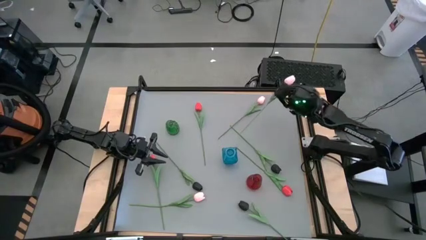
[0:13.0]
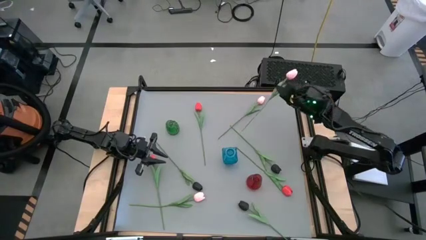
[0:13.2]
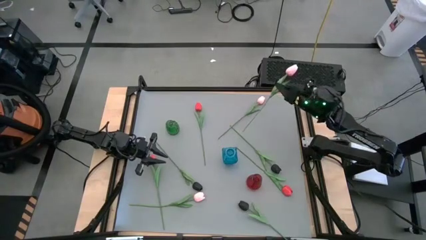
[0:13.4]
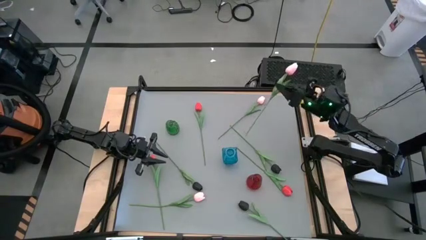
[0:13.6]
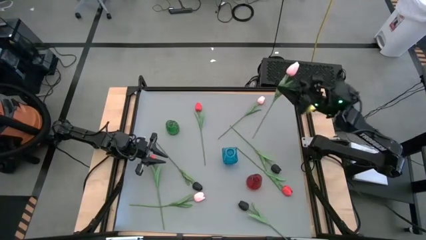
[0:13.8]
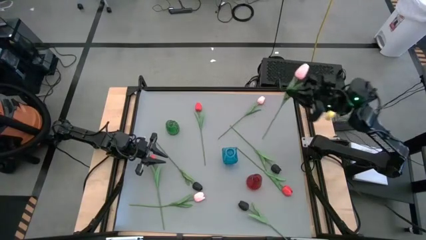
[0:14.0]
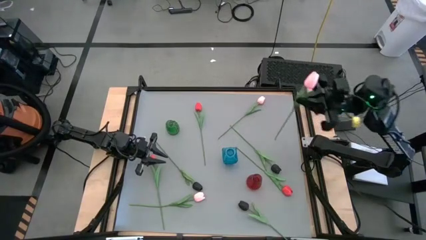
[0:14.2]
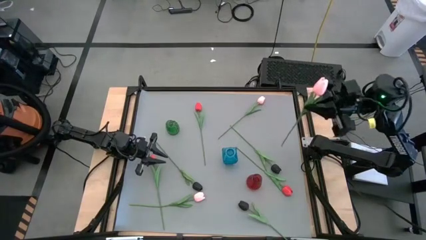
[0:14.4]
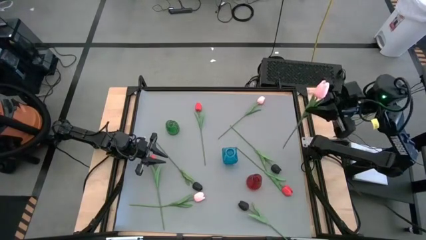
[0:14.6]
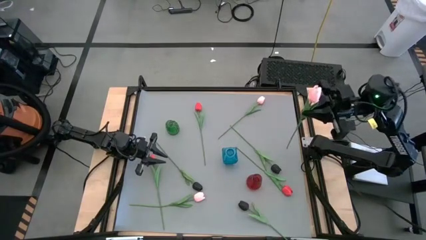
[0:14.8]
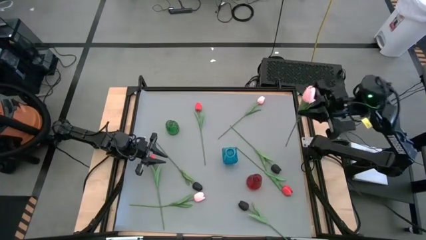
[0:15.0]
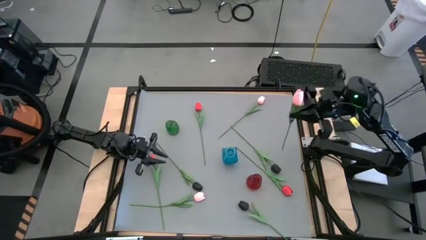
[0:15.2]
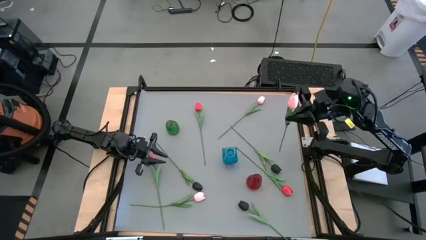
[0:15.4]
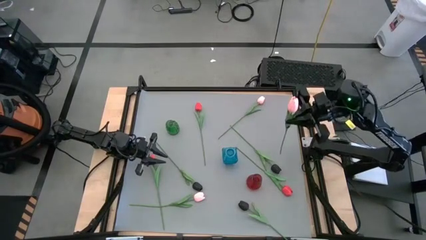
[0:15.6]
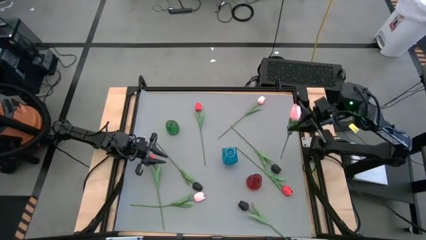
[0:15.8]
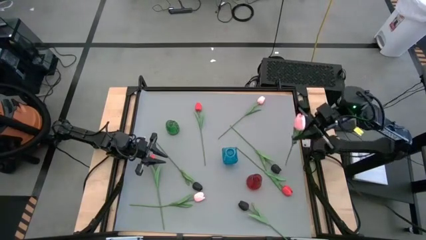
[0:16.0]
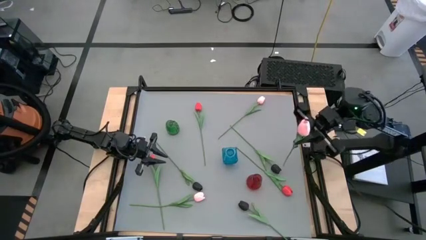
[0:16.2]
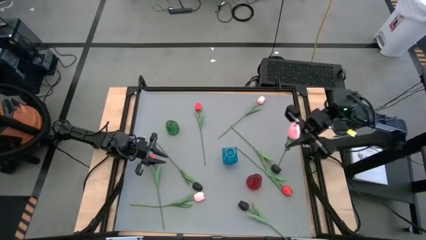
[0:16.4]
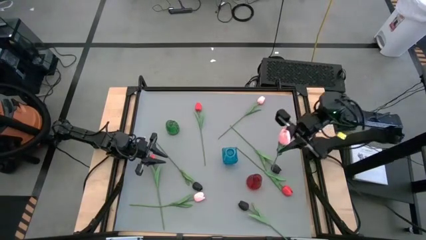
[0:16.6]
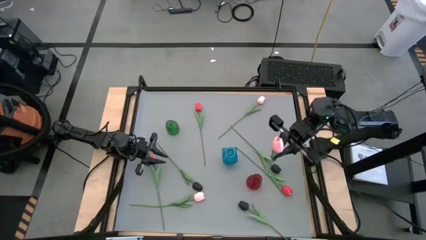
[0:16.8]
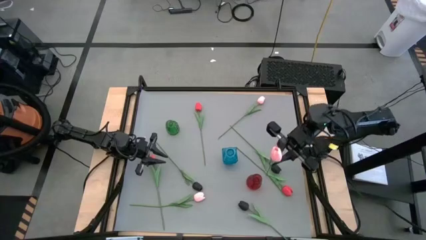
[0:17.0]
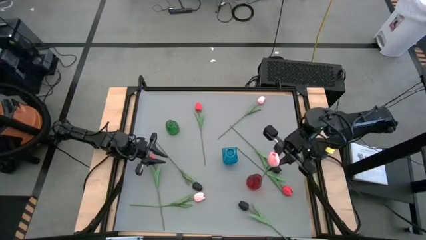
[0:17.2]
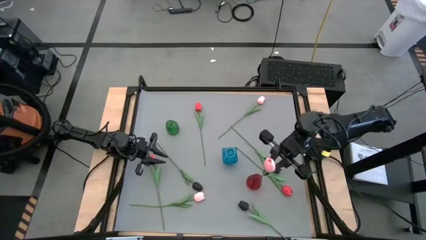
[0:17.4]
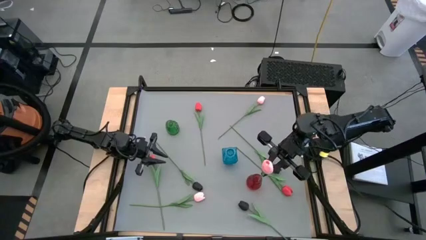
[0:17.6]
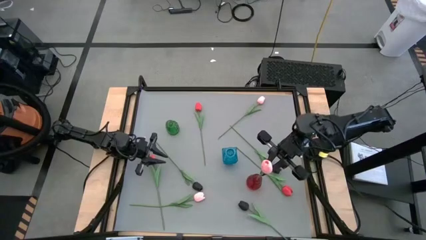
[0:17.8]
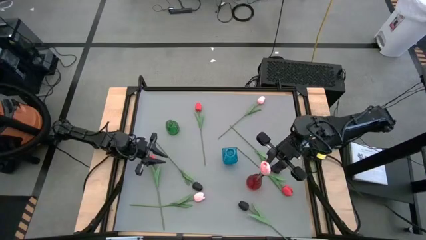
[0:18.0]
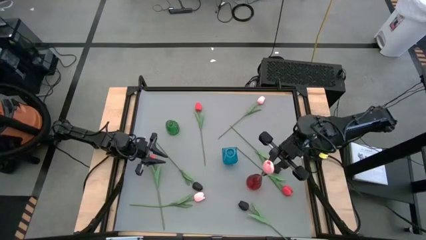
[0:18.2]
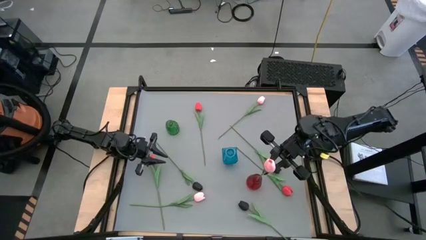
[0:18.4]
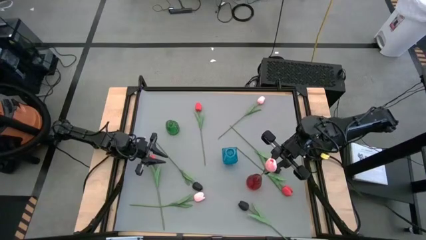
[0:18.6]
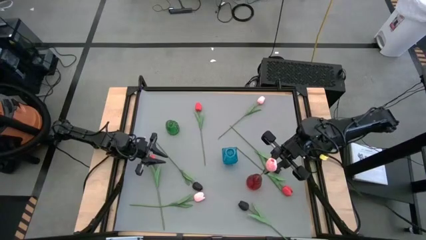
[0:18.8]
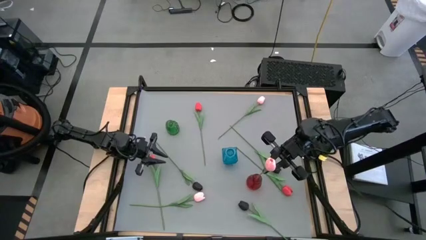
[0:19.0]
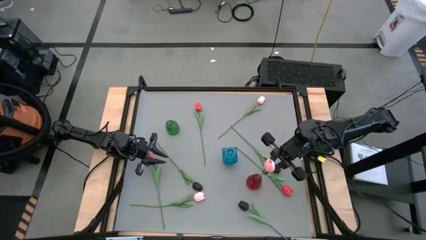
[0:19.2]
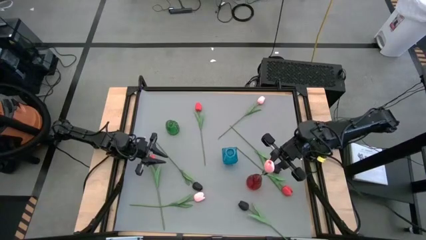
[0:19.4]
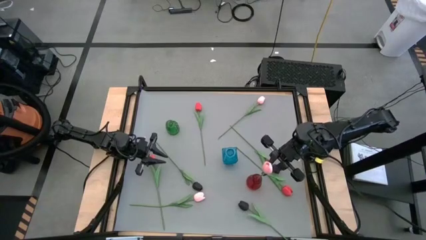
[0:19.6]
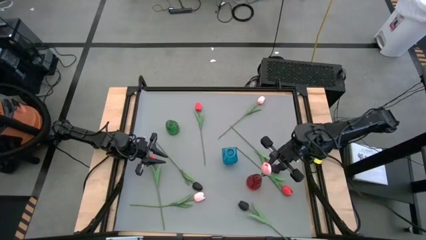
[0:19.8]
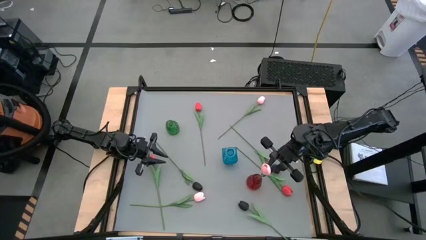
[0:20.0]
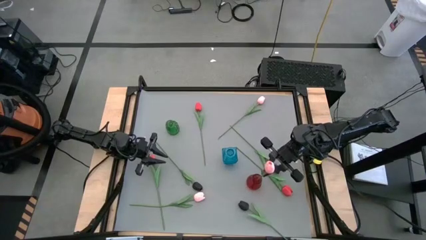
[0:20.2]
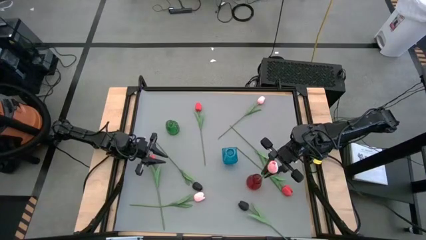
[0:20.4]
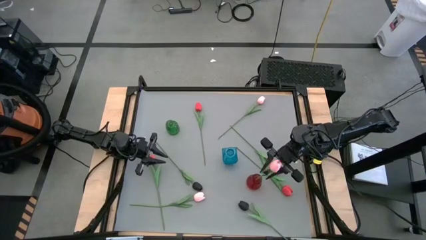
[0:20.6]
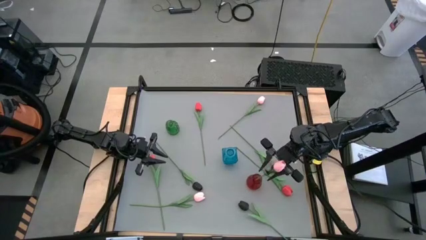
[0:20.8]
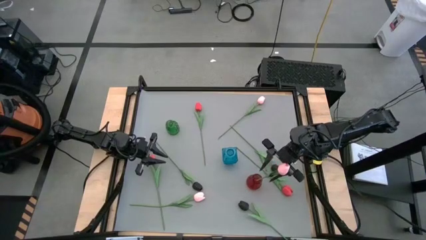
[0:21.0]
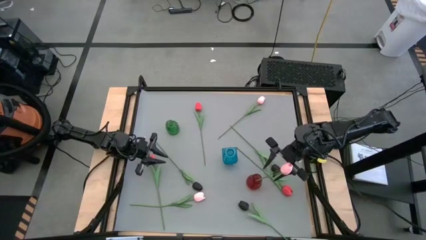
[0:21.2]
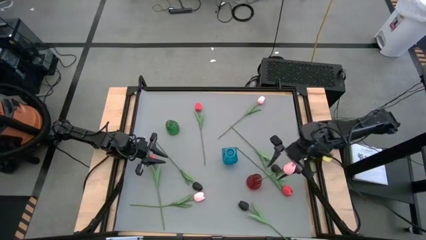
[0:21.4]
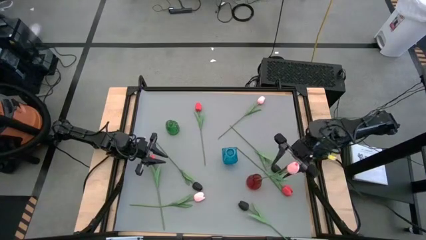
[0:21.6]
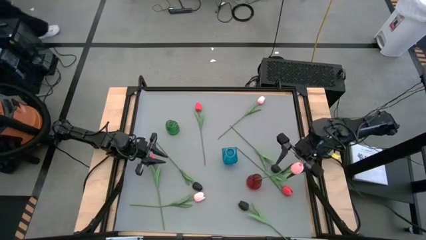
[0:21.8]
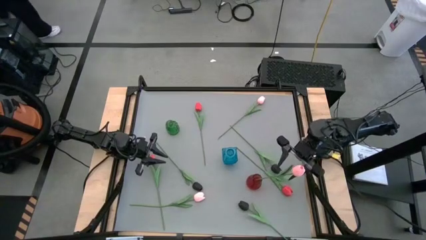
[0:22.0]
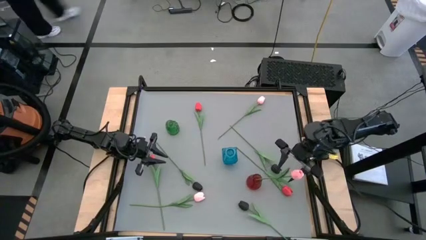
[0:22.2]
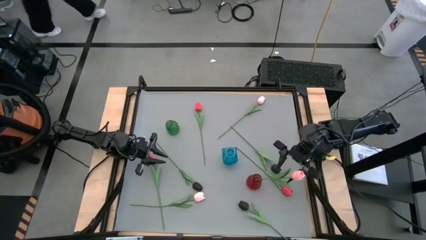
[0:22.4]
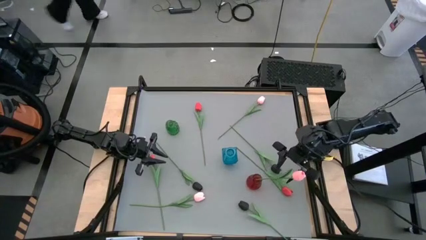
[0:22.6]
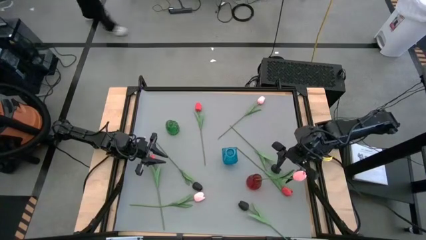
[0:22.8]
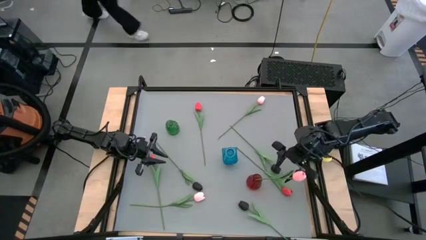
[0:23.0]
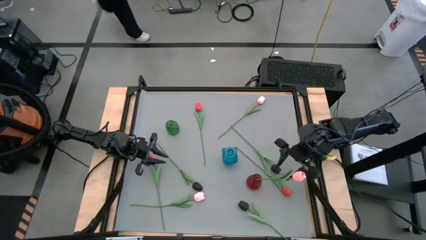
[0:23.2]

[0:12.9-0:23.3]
Task: Sort flowers into vase by color
Put the middle pink tulip into the red vase
